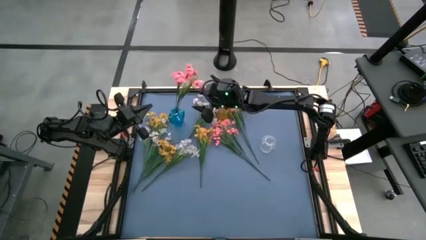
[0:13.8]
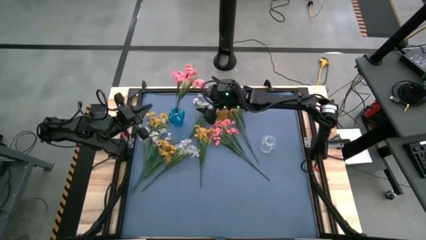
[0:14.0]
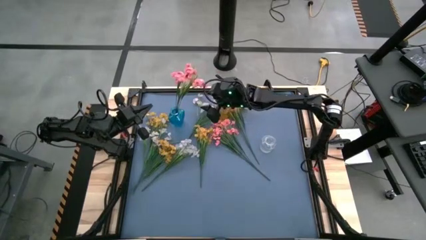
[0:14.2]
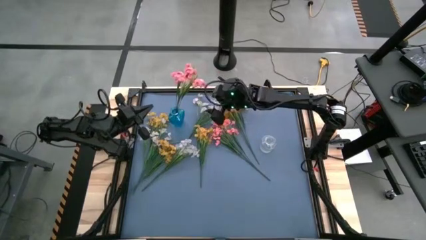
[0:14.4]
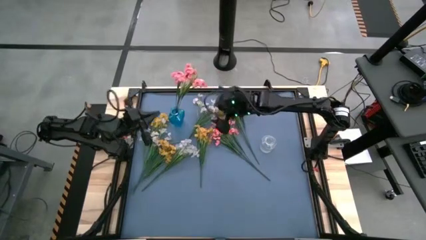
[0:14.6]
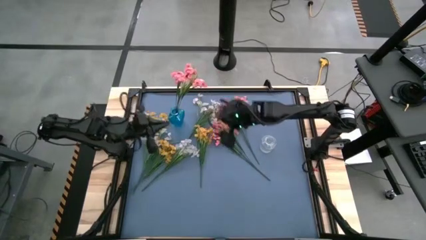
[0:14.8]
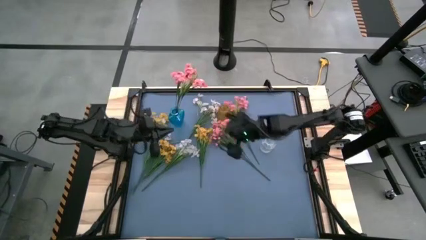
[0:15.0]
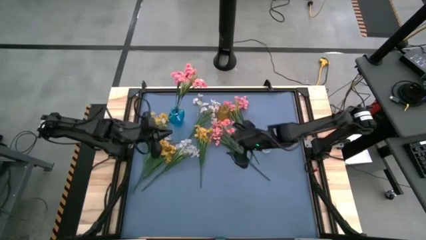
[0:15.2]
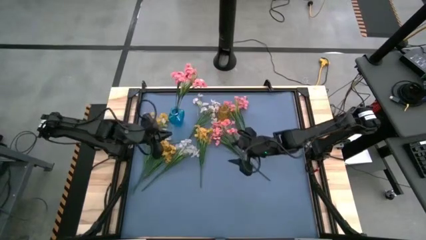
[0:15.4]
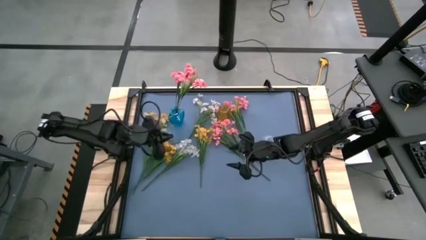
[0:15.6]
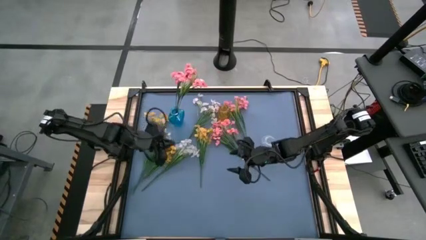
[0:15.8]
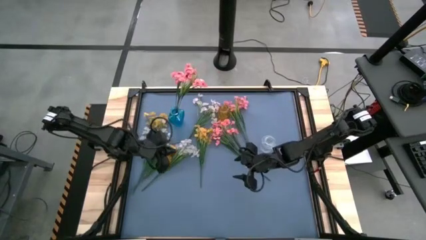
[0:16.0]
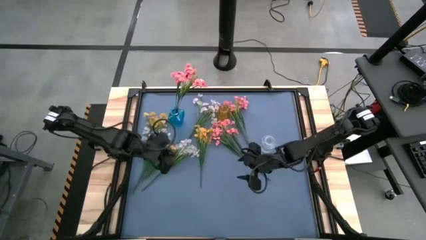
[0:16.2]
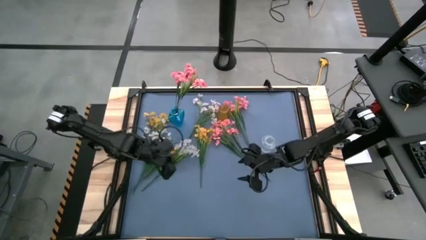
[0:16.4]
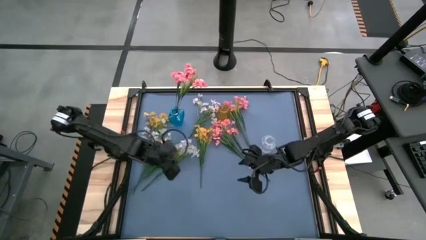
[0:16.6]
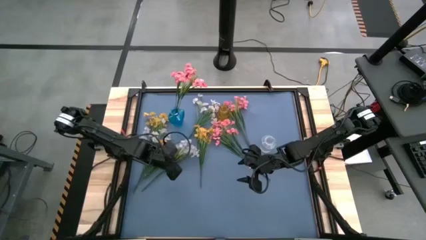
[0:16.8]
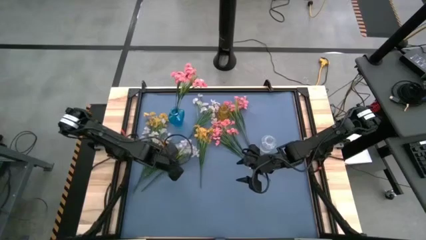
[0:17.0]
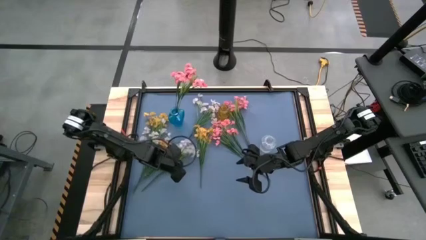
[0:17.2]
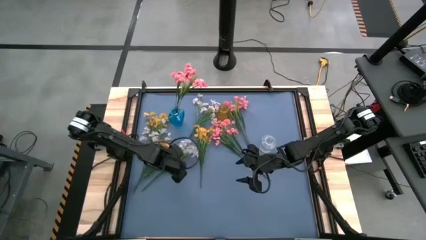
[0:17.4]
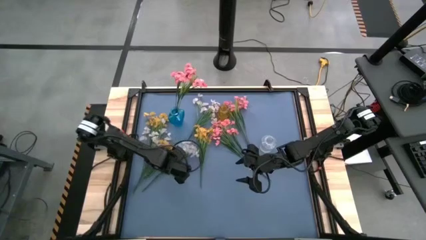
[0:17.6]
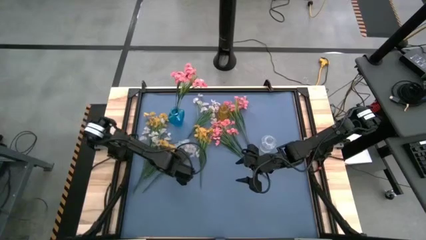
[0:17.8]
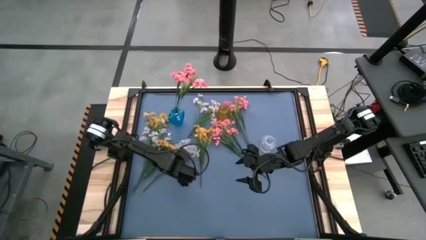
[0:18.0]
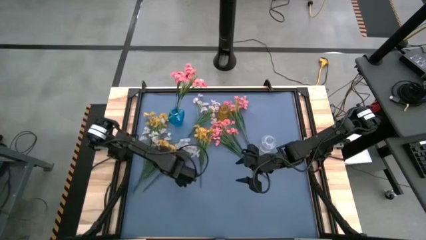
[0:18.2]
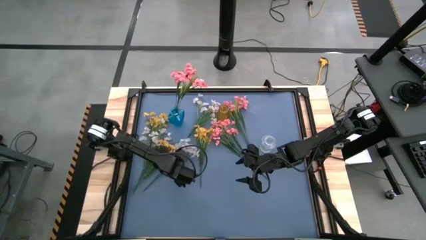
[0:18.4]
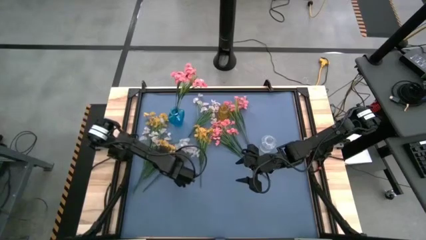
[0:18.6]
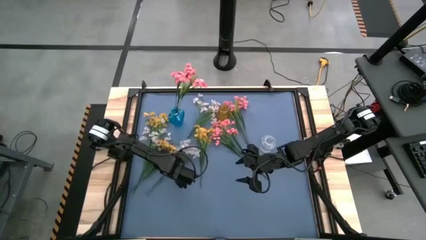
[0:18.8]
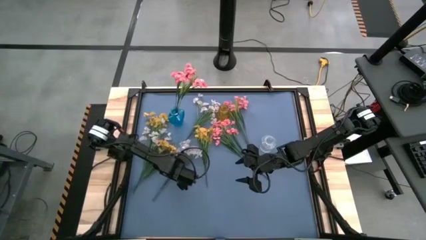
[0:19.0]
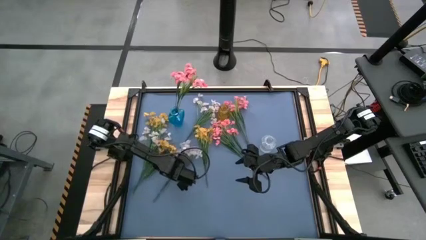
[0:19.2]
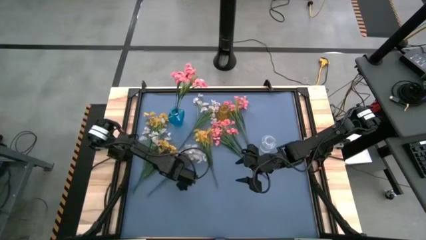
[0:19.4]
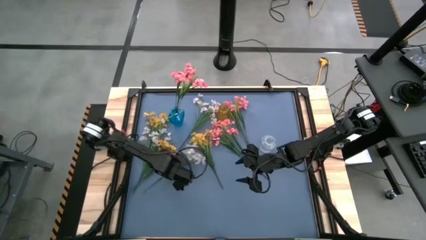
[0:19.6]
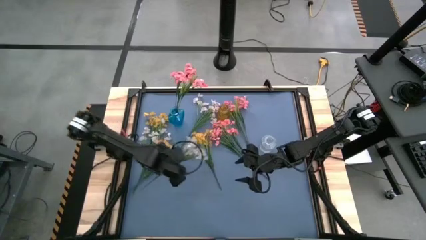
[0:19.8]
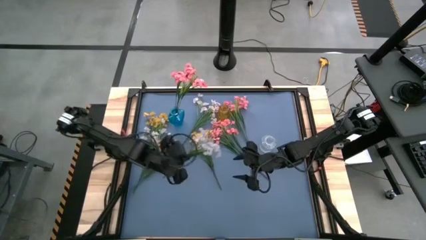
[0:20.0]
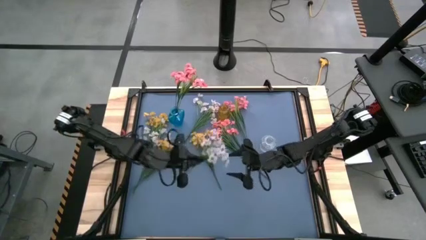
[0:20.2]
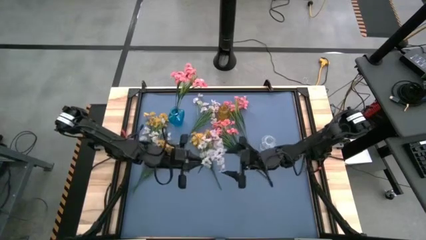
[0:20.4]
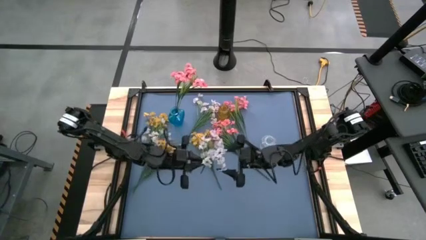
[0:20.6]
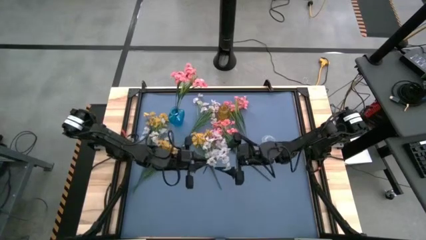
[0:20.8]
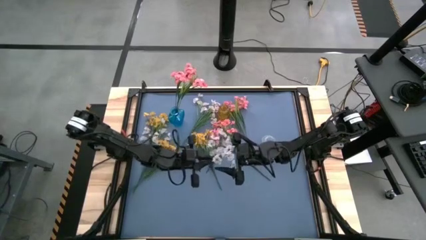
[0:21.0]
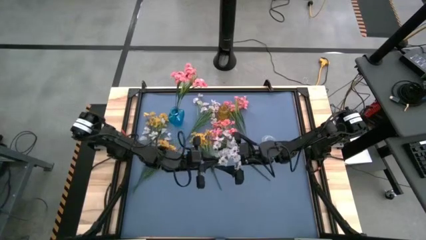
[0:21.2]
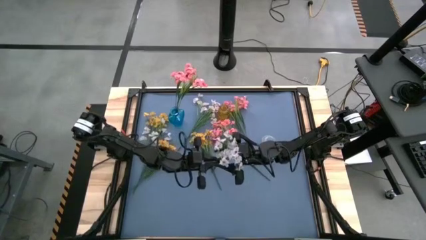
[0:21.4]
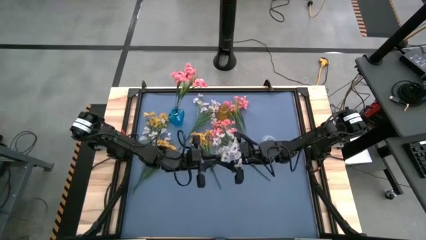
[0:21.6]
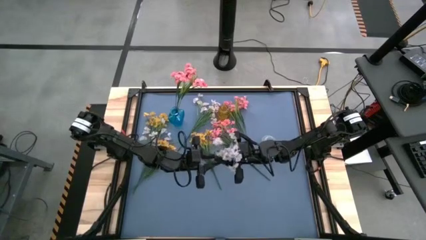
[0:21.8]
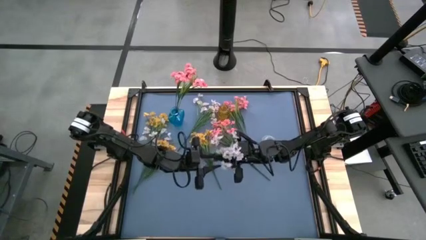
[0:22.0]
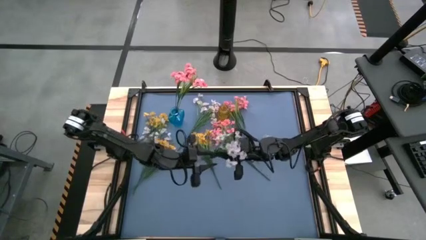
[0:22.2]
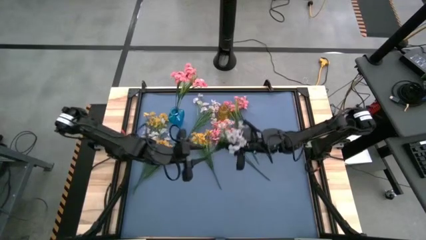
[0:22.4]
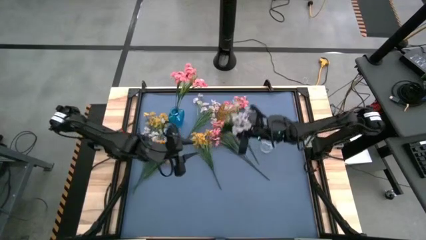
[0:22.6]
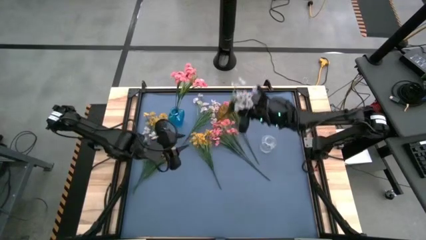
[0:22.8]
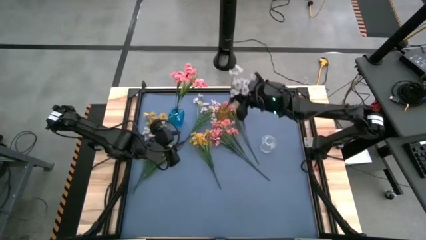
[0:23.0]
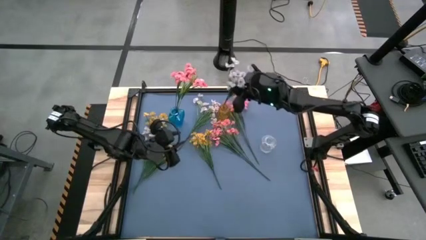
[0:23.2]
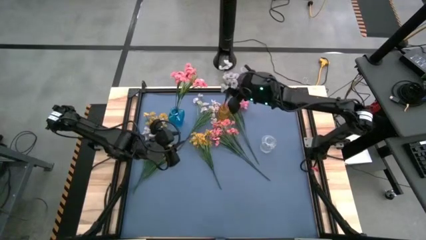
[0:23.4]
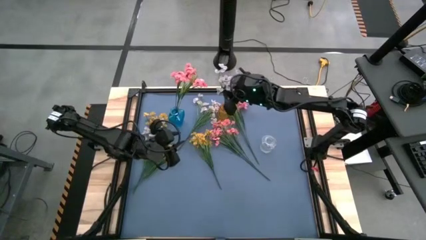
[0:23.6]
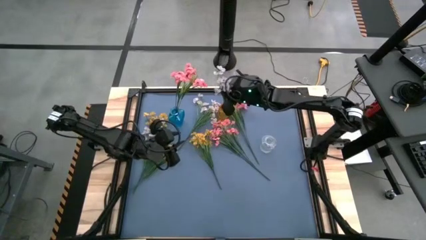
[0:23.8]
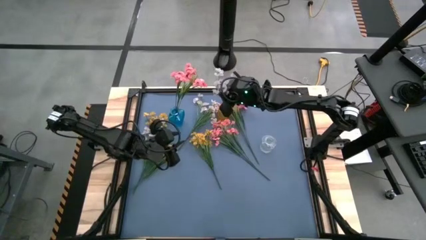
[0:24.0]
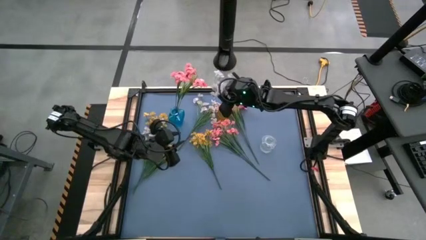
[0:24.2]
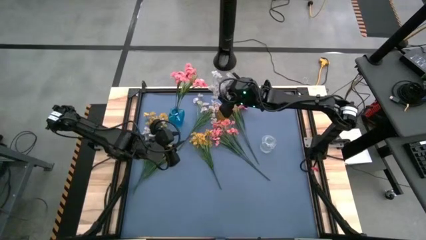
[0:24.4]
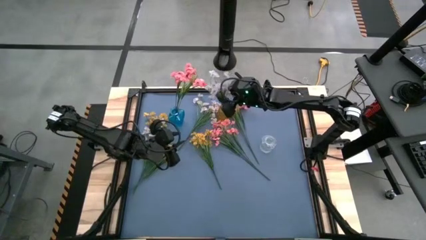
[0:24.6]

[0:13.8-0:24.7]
Task: Sort flowers into vase by color
Put the bottom right white flowers into the yellow vase

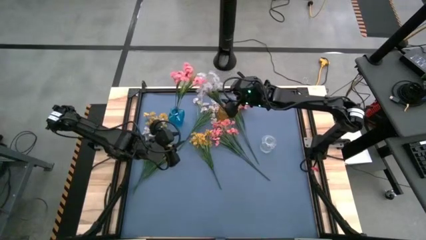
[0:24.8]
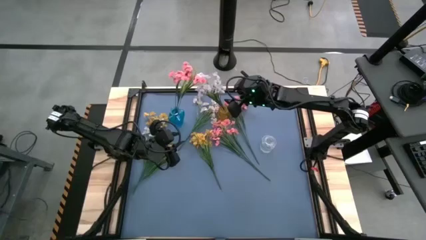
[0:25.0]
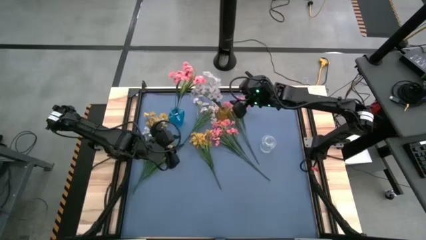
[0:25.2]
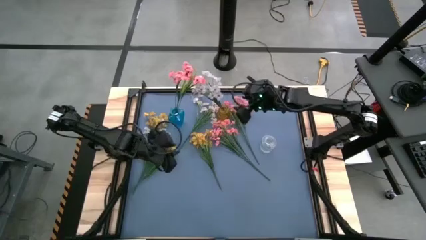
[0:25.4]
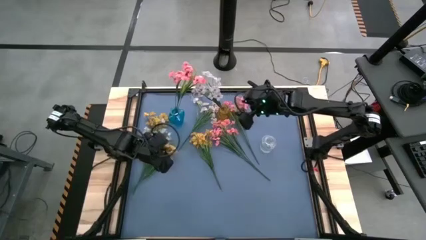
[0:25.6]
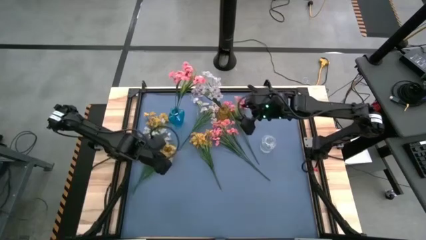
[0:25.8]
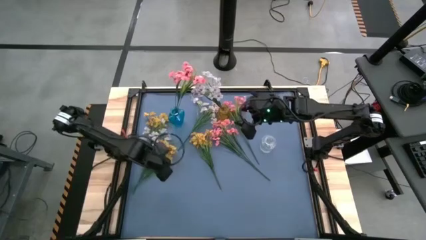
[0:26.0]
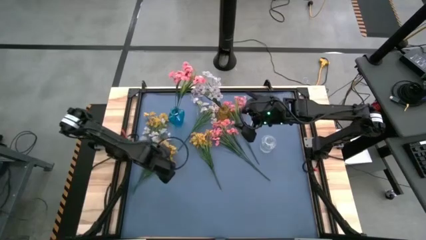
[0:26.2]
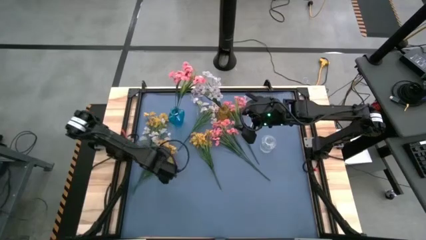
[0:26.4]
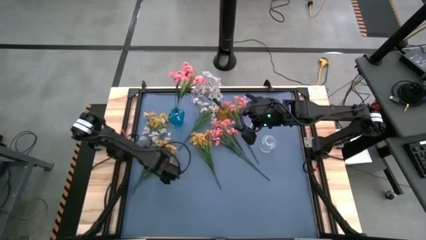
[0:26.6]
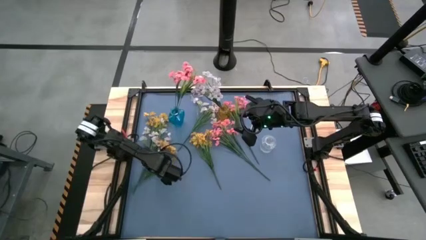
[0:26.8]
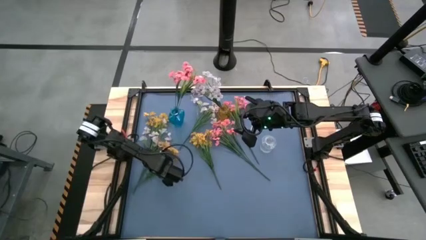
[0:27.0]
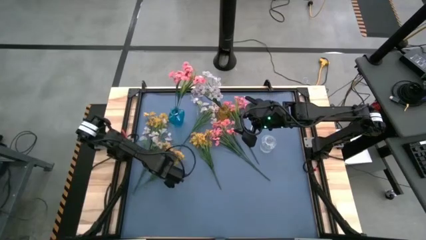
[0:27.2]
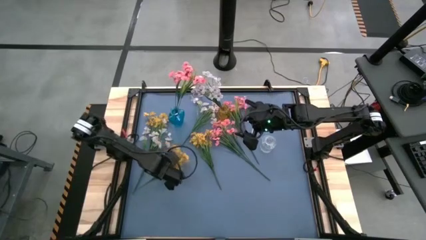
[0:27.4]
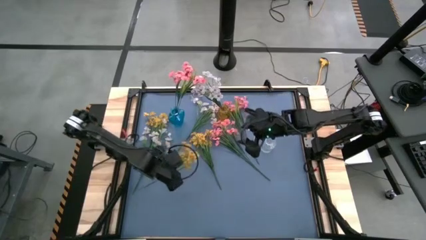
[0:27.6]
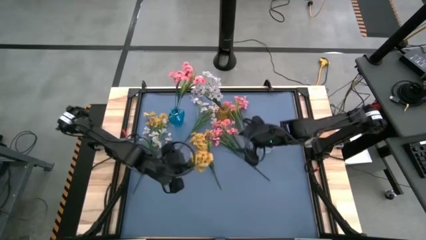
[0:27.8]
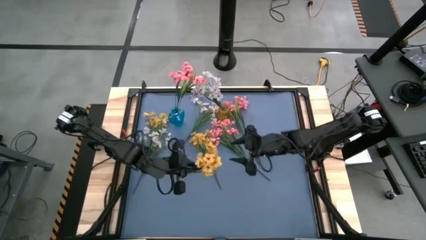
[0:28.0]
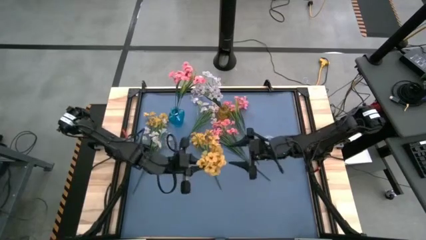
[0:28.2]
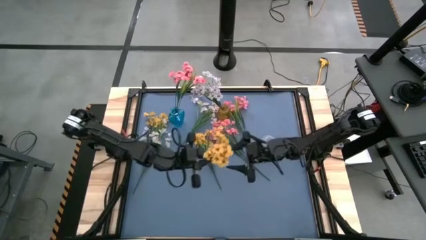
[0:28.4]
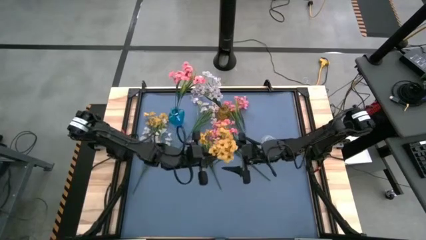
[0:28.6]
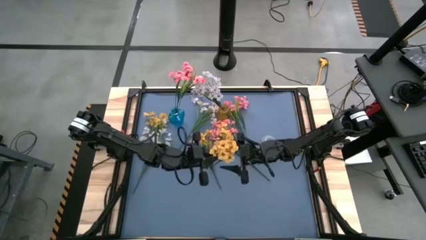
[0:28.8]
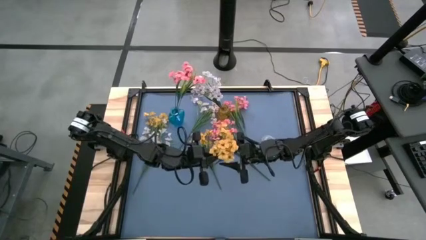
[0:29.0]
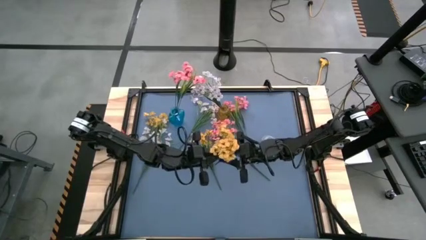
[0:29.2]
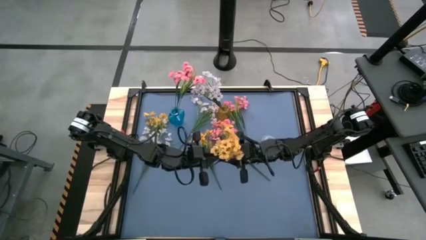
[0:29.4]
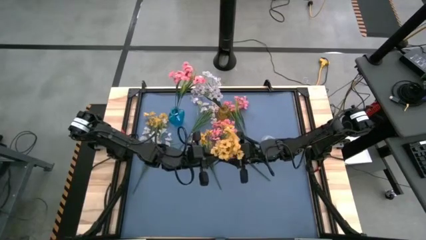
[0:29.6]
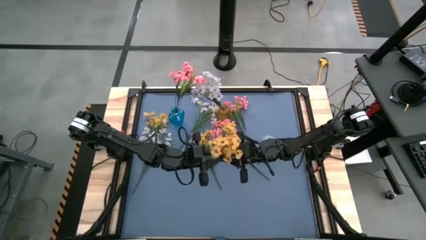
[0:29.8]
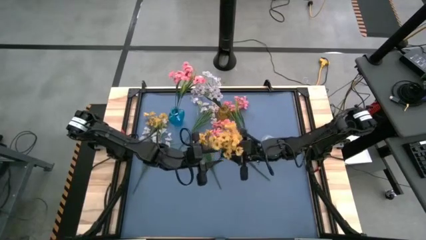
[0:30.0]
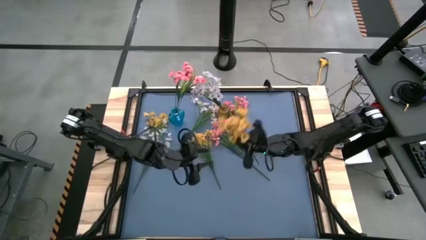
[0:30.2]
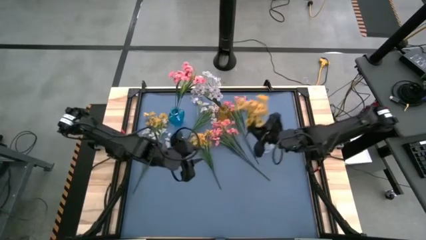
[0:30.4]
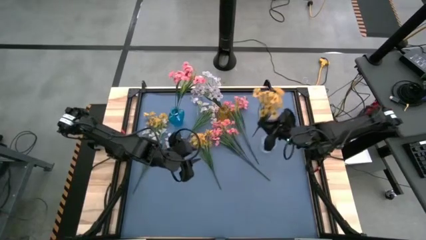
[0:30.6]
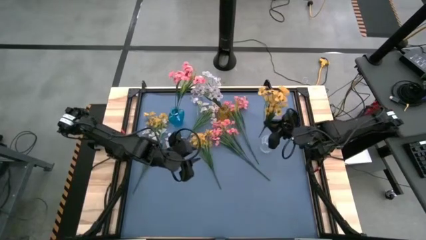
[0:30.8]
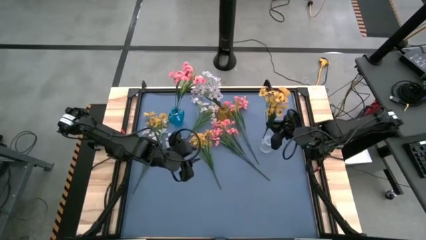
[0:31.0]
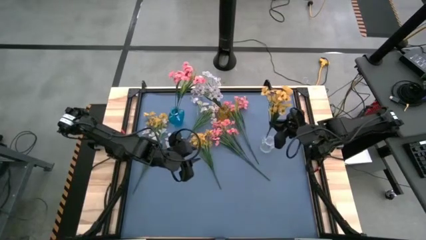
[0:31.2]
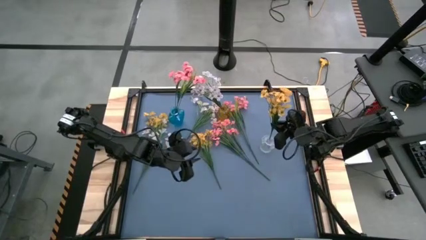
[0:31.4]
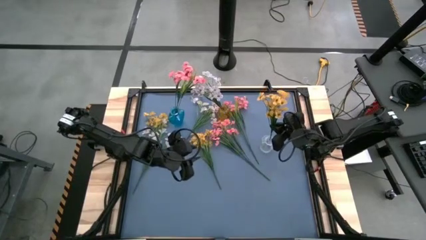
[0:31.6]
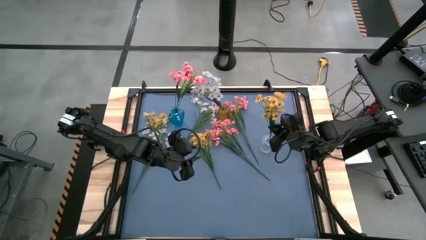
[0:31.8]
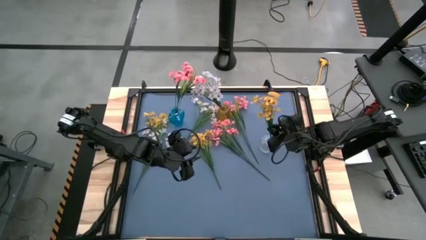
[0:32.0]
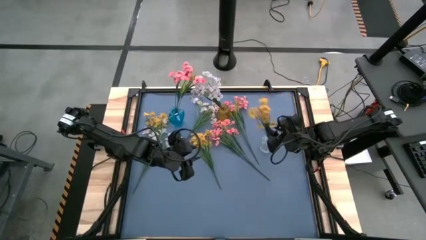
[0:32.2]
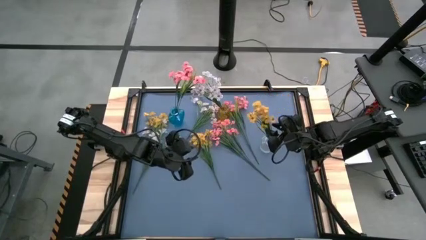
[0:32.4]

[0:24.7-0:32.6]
Put the bottom yellow flowers into the transparent vase
